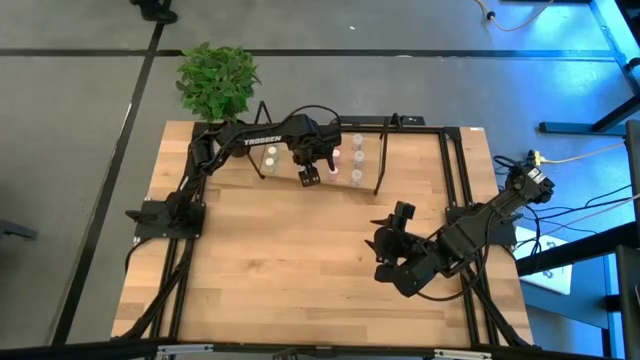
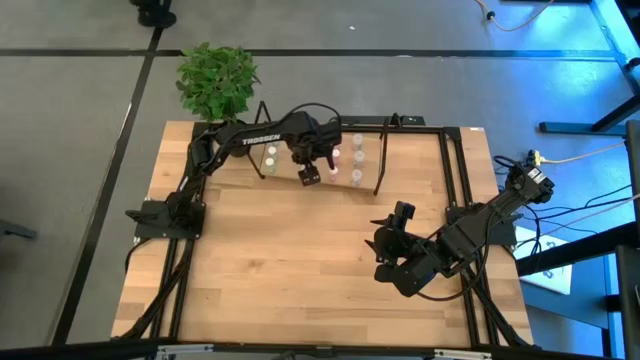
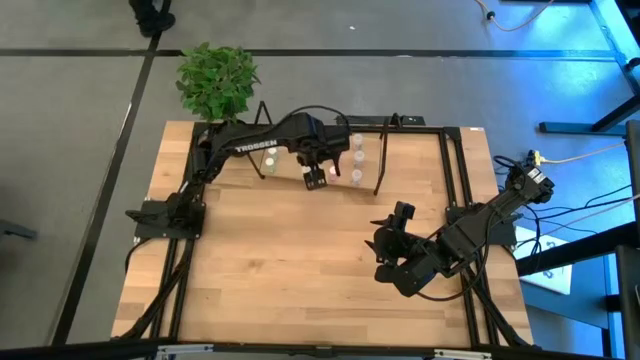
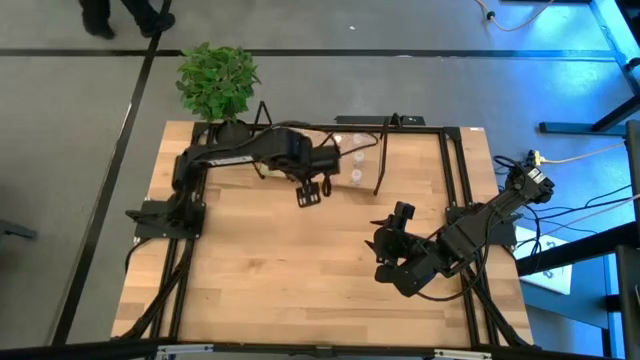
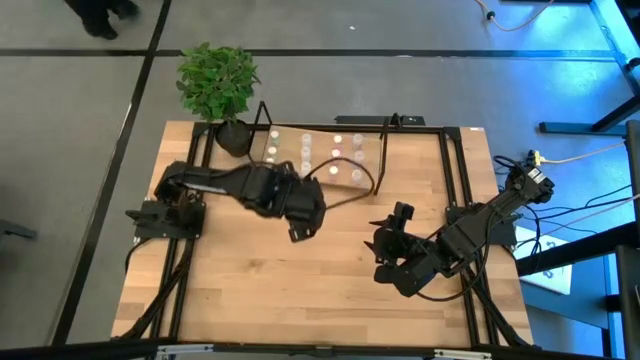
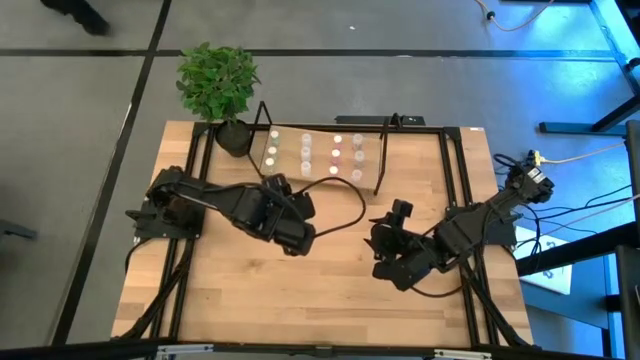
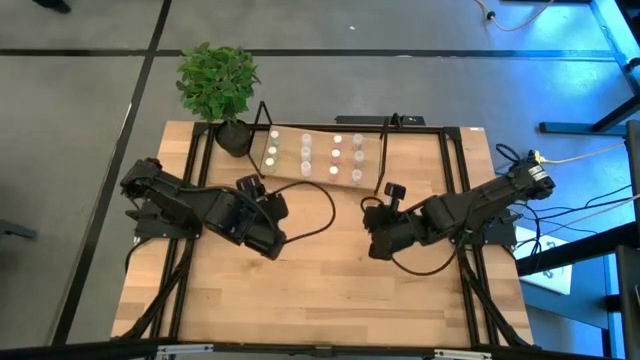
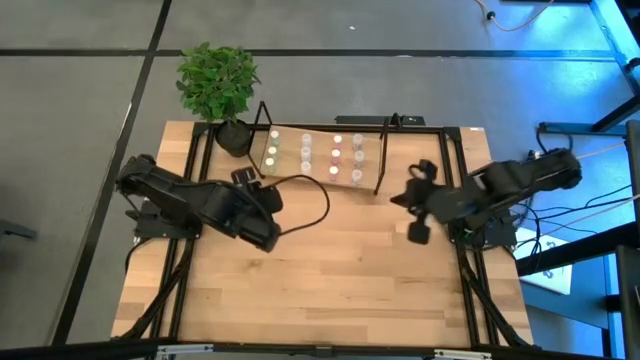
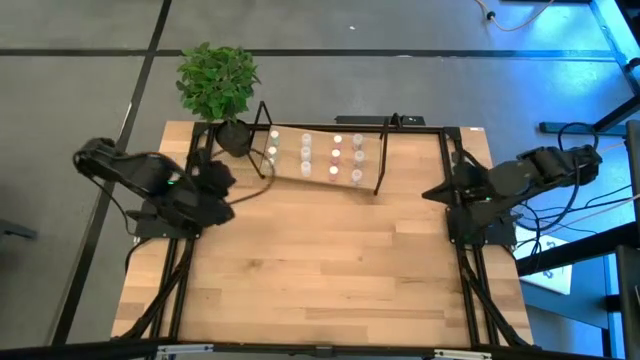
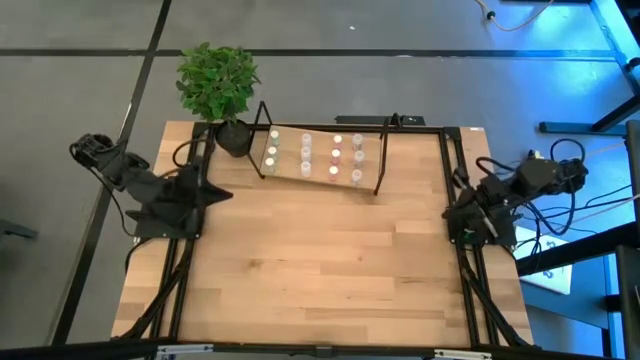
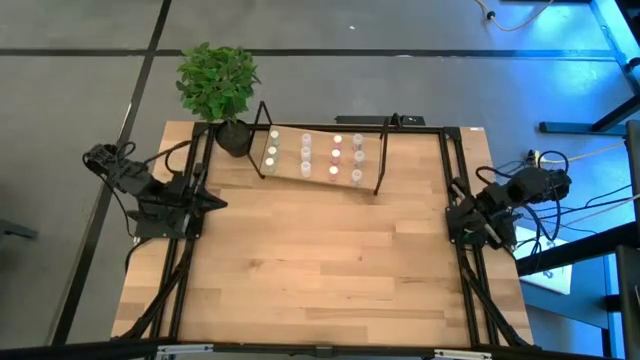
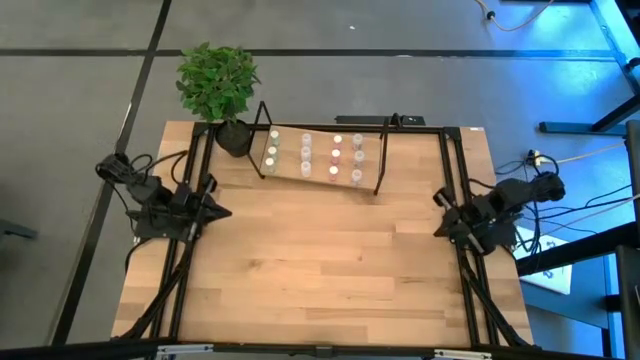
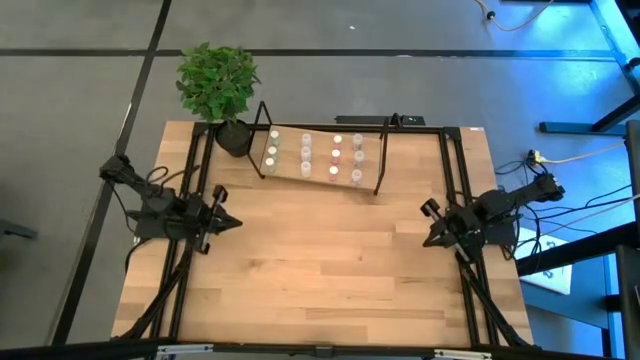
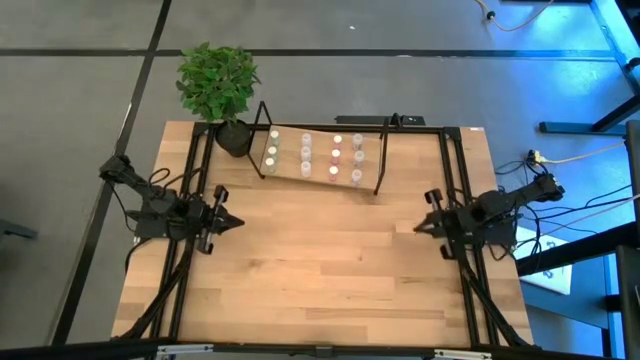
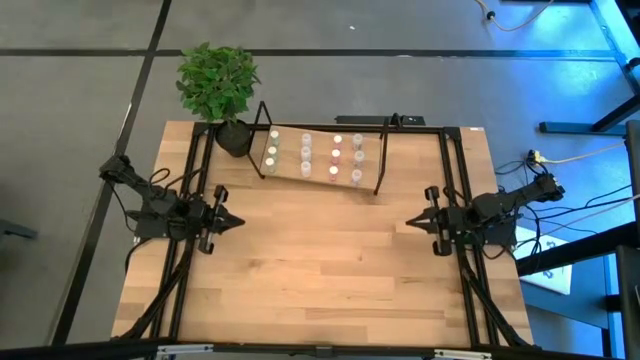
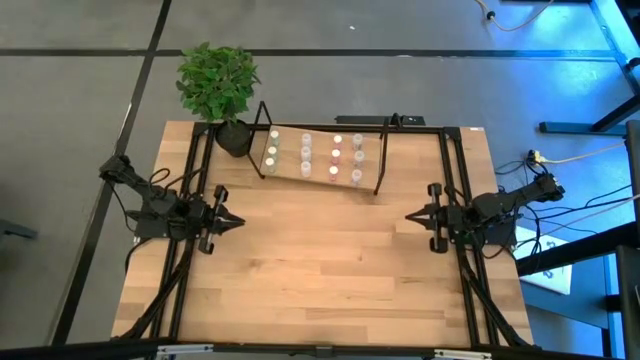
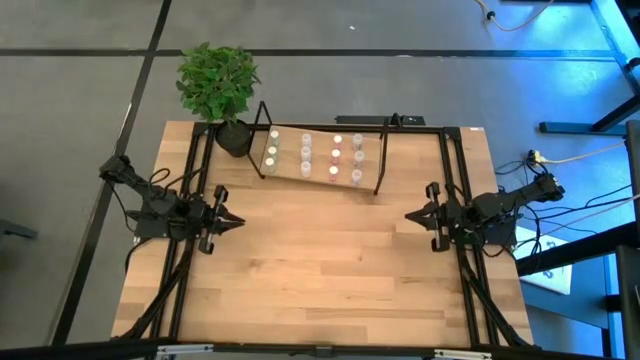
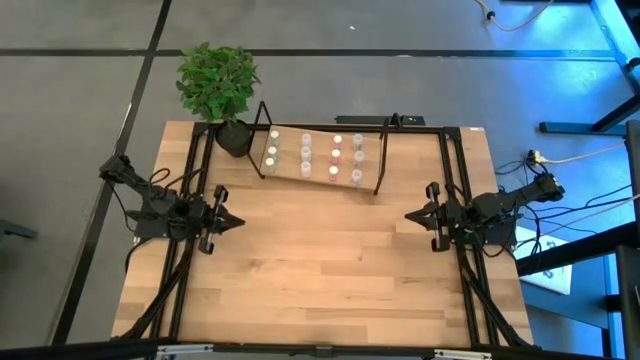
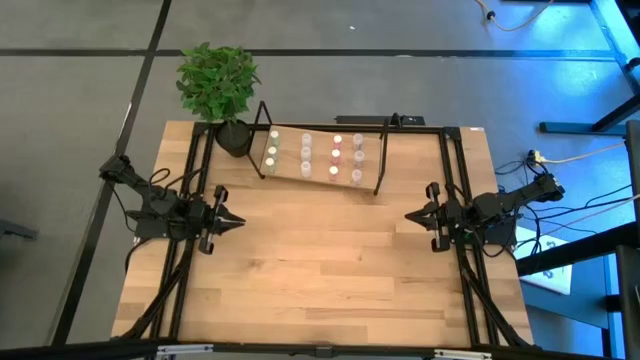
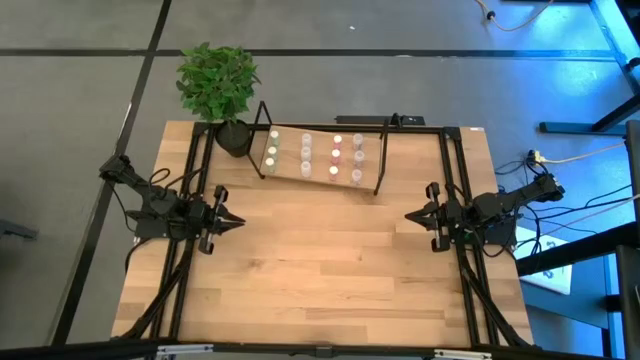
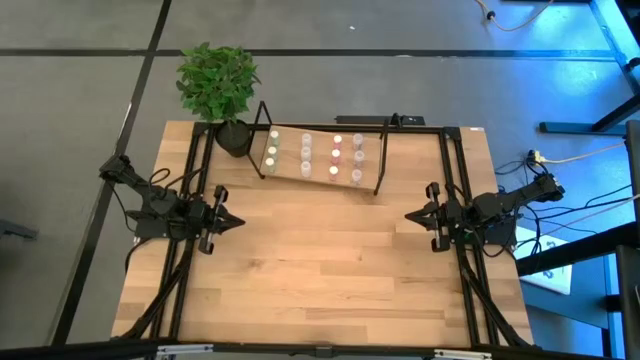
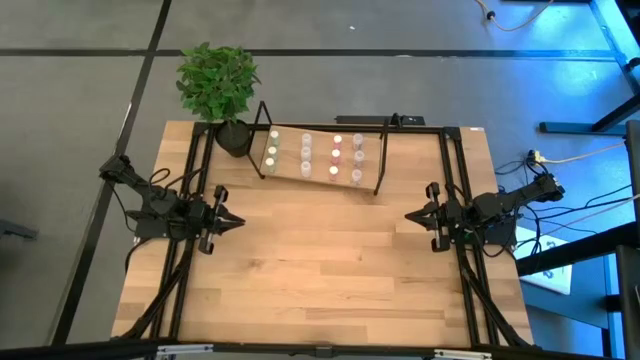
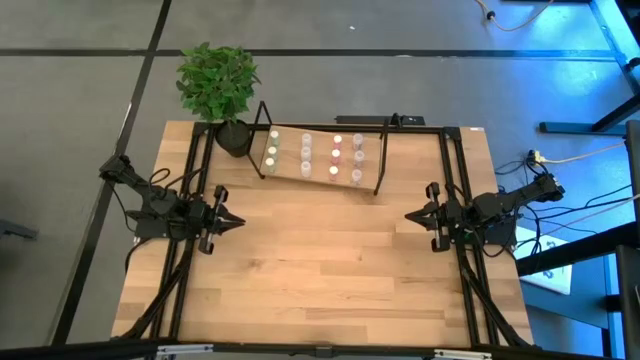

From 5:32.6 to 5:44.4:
Task: Pick and place medicine bottles onto shelf by color
Return to Home Position

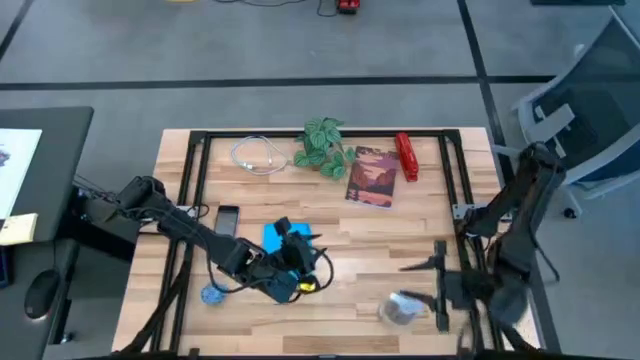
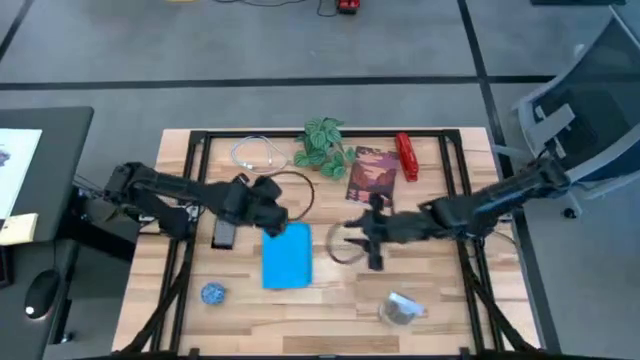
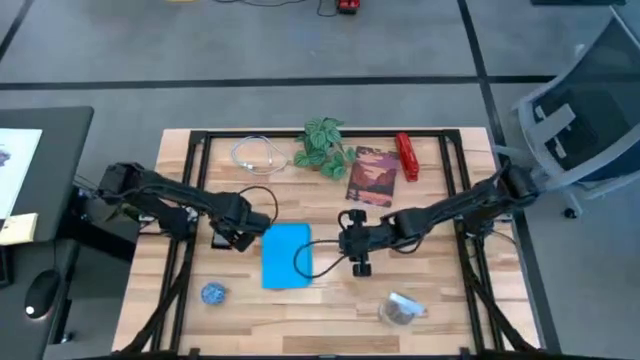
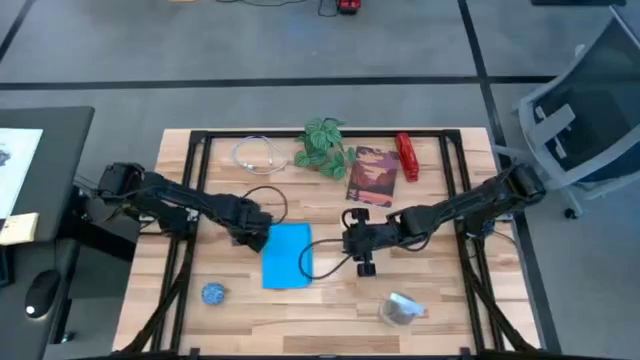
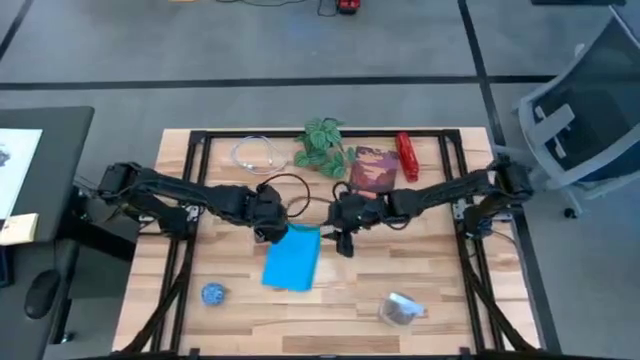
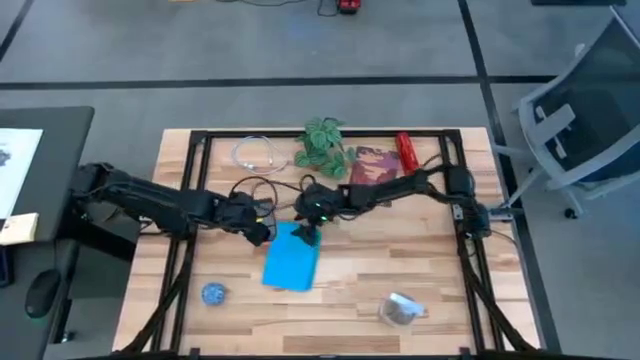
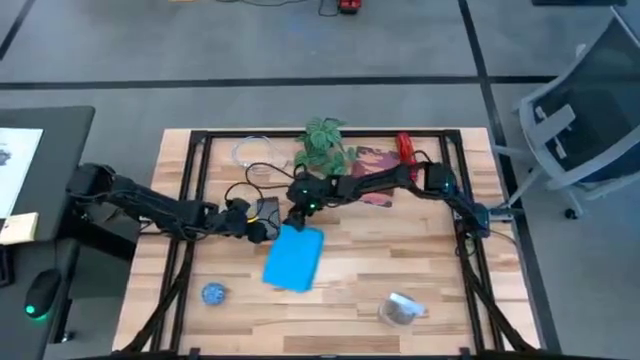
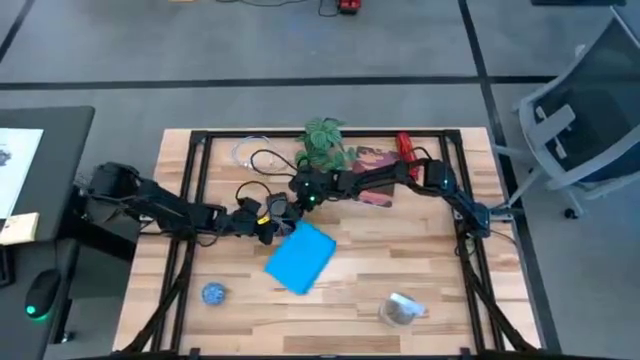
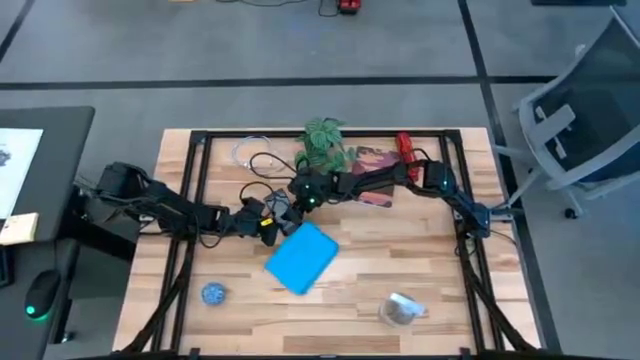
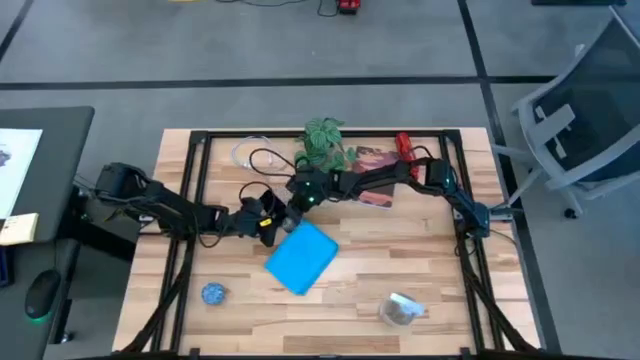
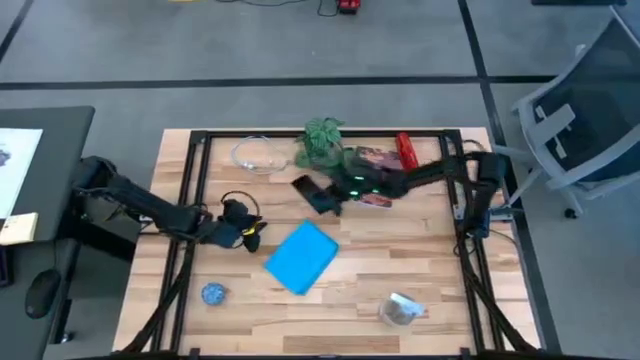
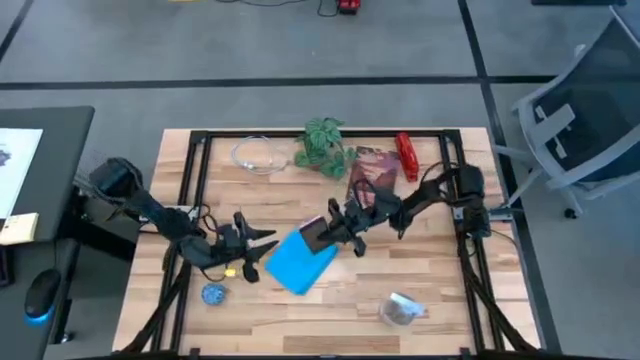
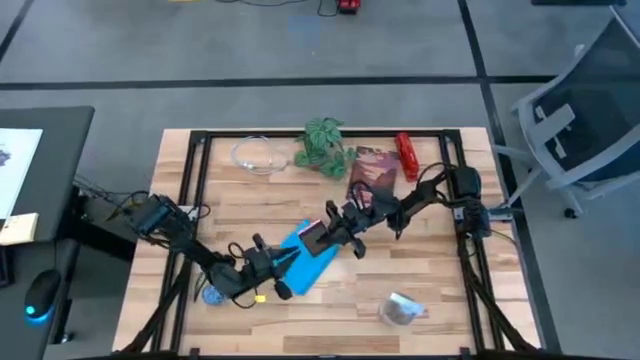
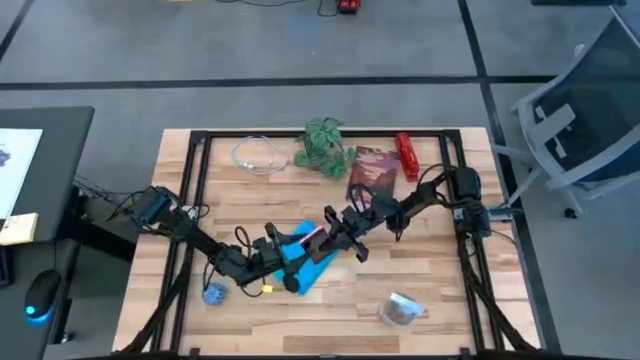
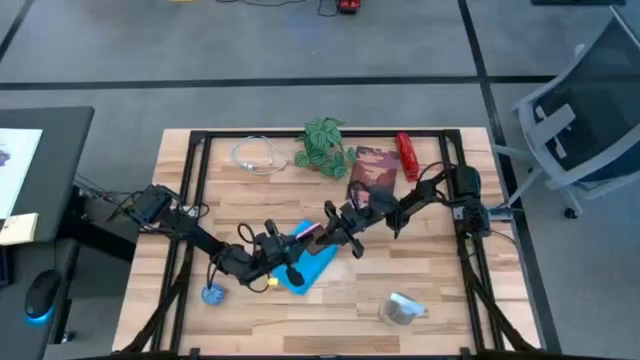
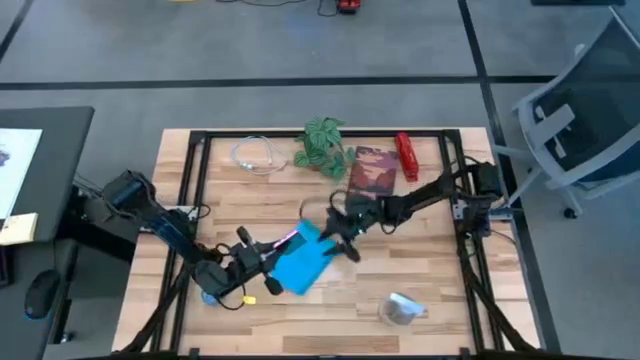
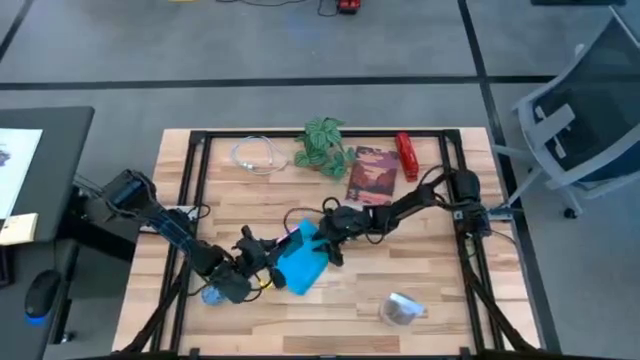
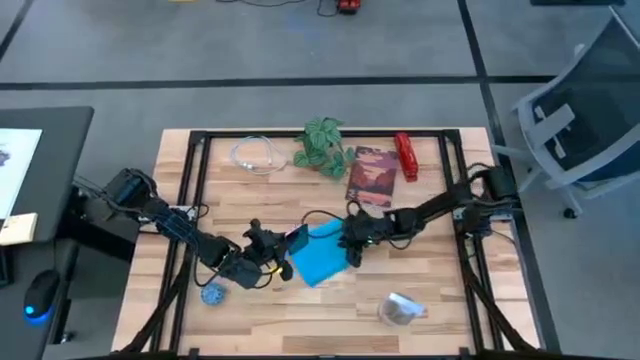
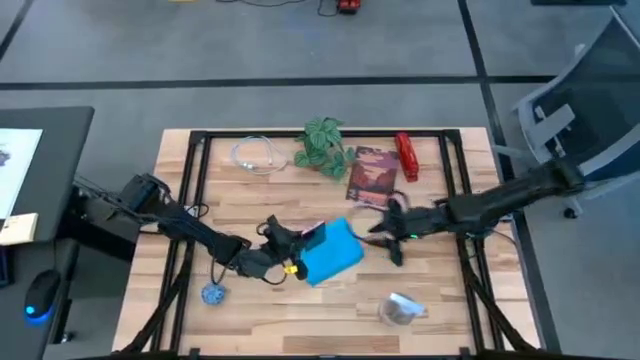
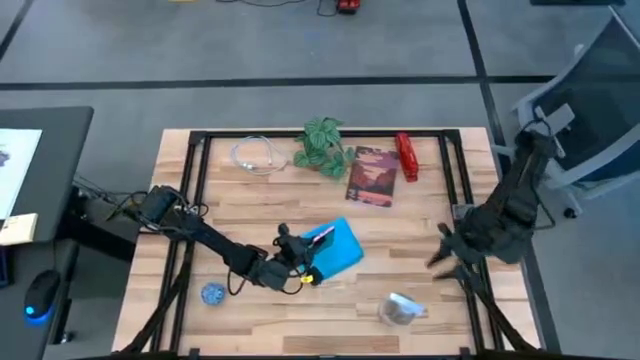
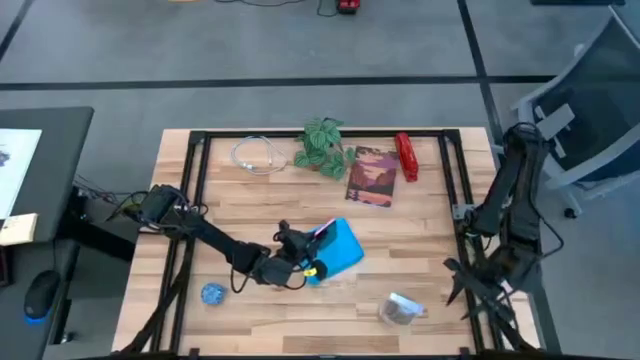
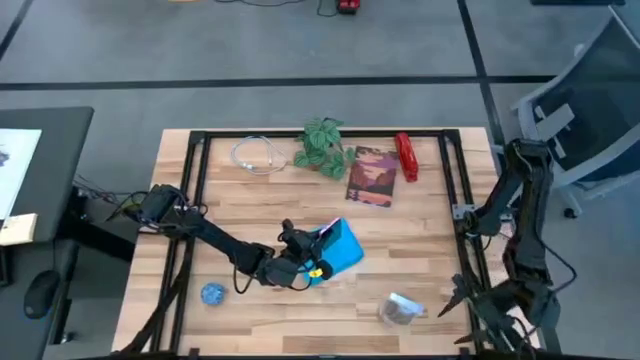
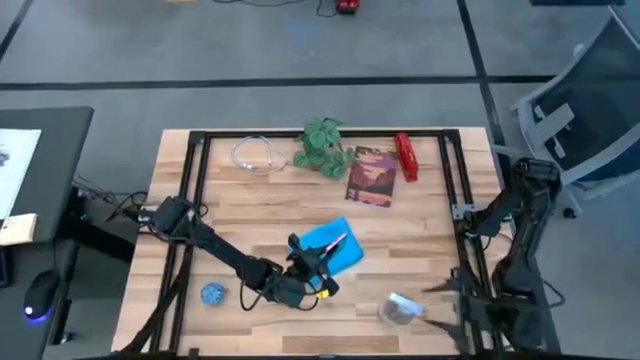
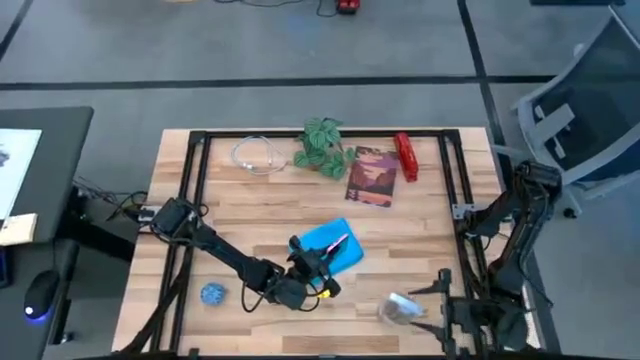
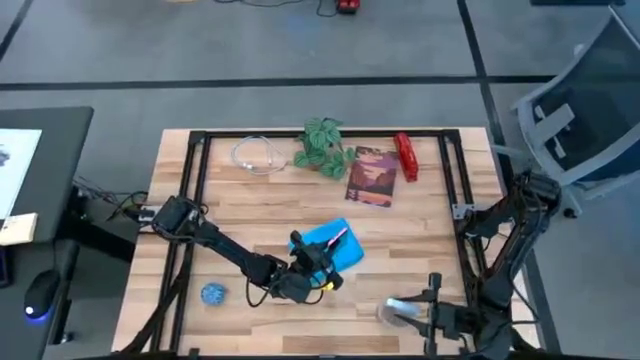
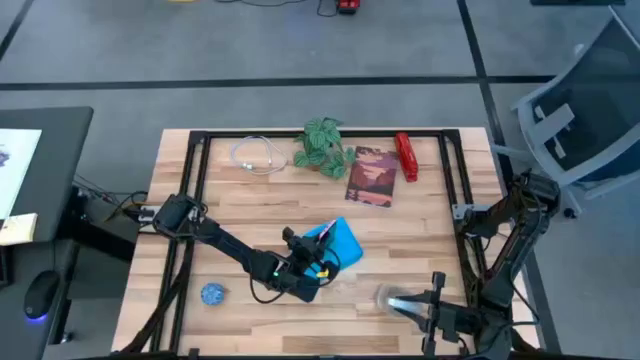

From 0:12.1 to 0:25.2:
Task: Apply microfiber cloth
Spray the front of the pink cellphone with the transparent spray bottle
